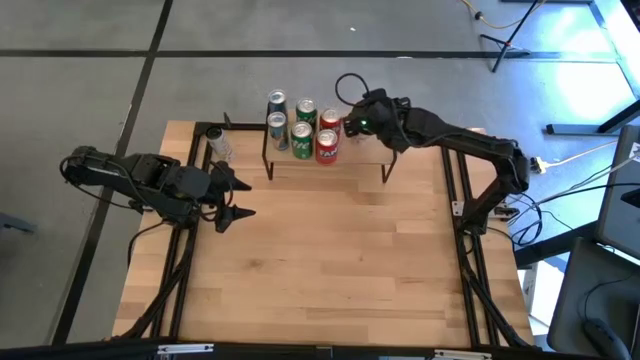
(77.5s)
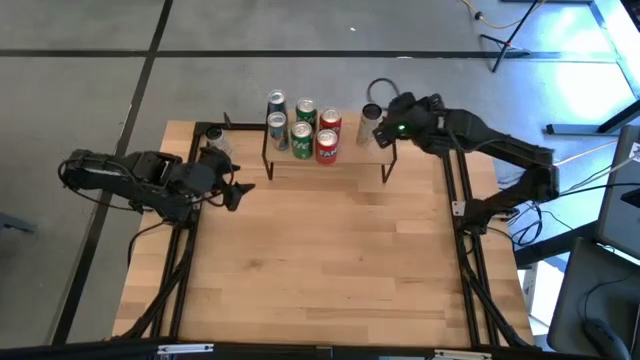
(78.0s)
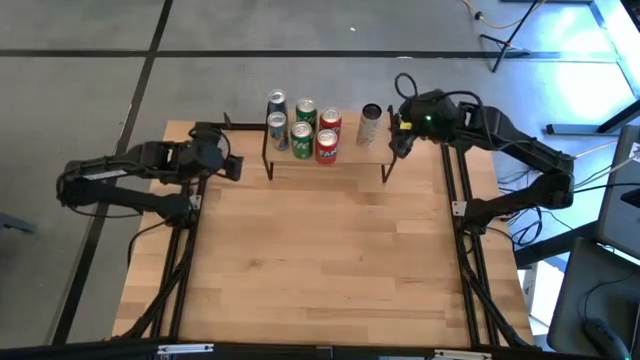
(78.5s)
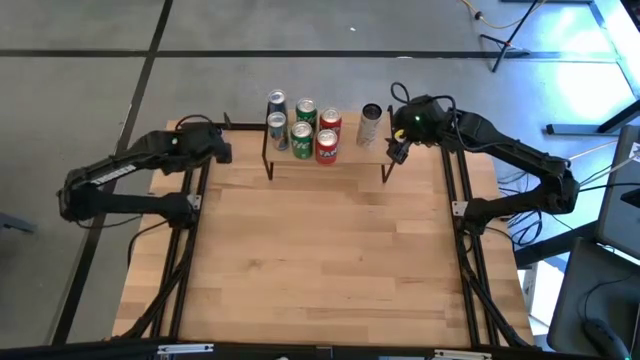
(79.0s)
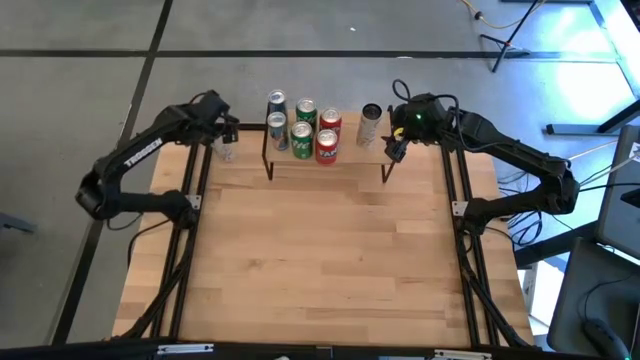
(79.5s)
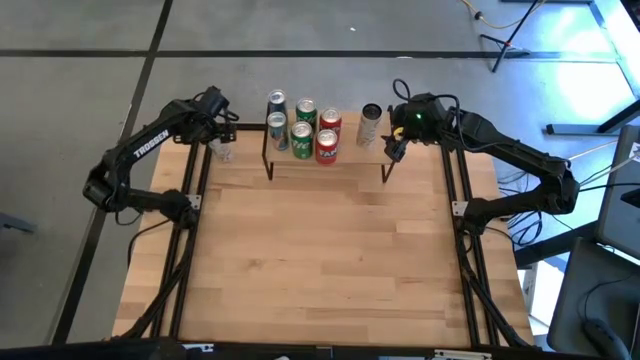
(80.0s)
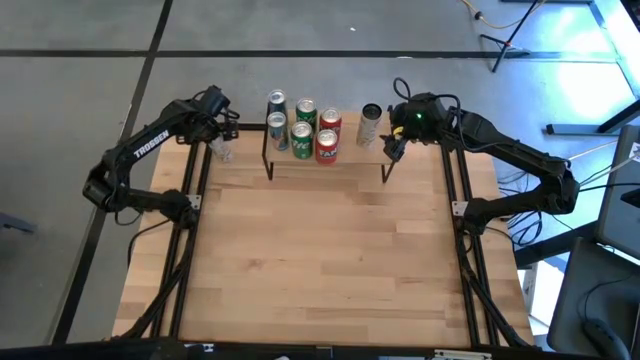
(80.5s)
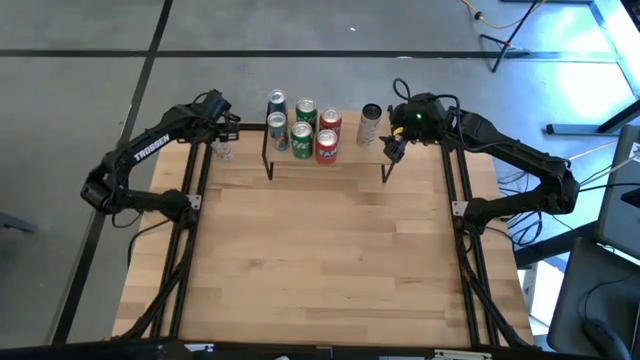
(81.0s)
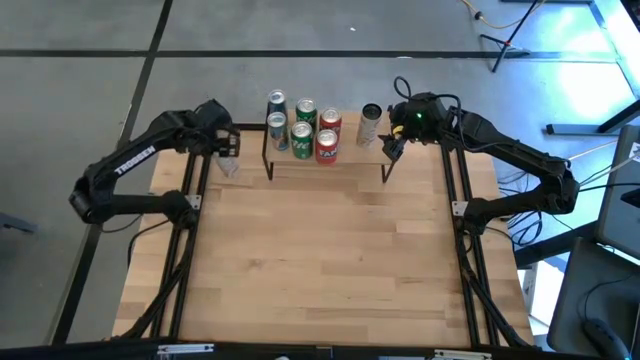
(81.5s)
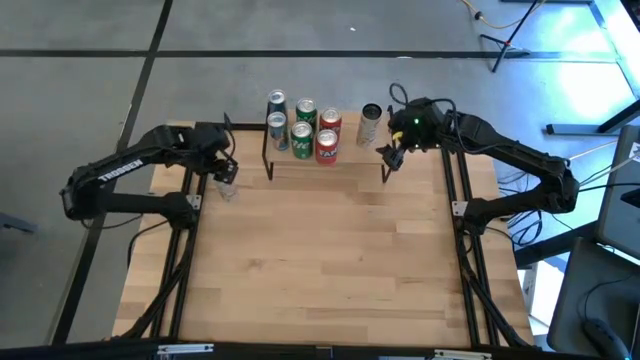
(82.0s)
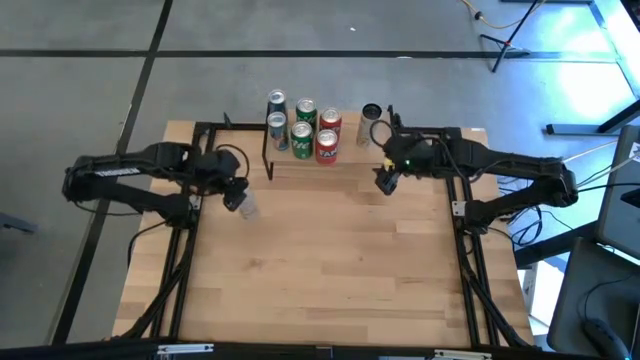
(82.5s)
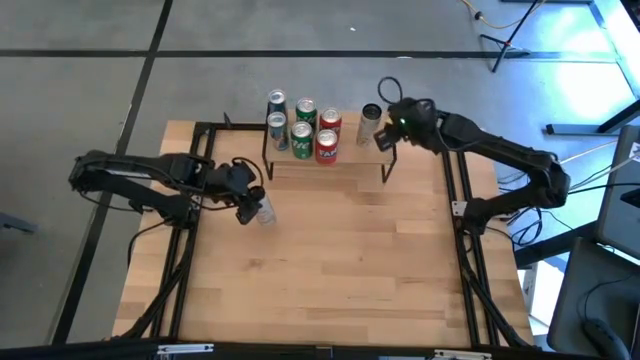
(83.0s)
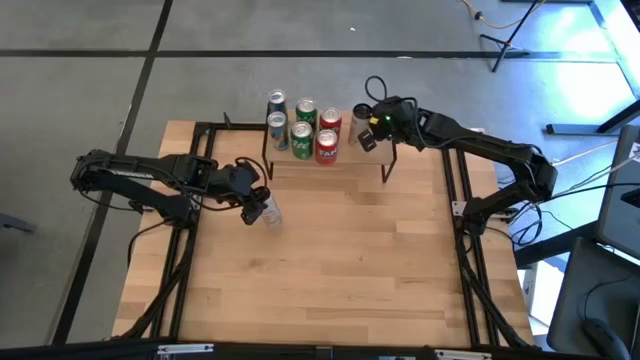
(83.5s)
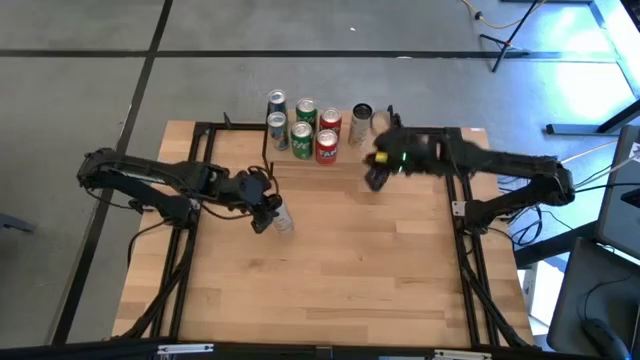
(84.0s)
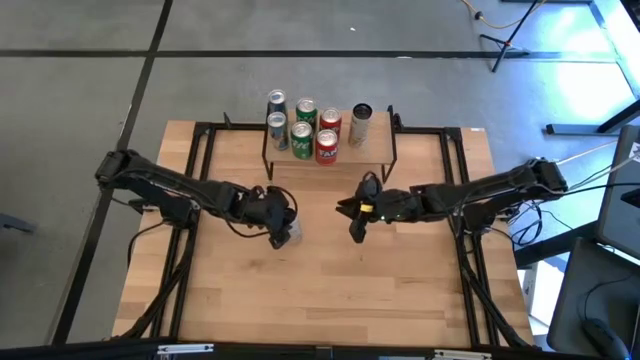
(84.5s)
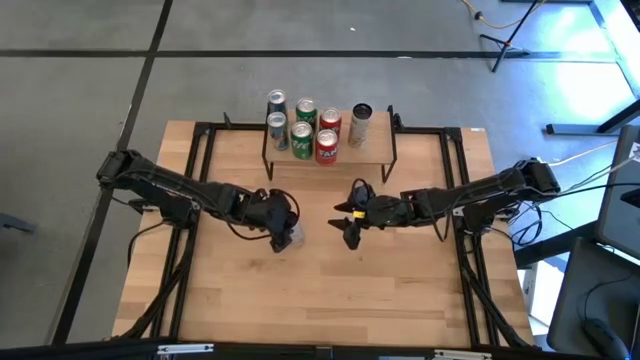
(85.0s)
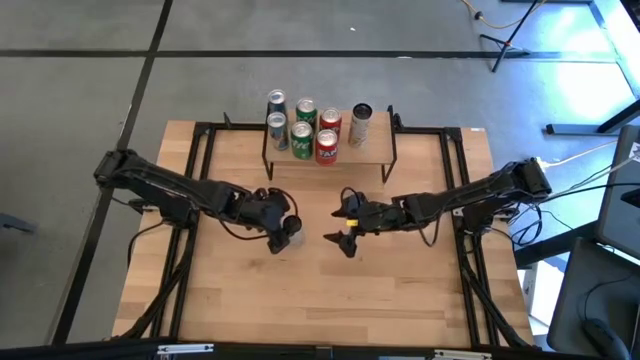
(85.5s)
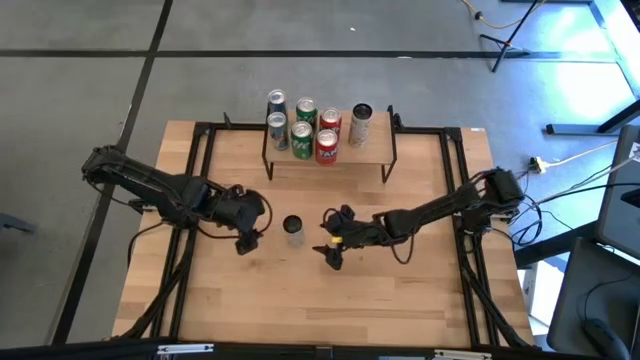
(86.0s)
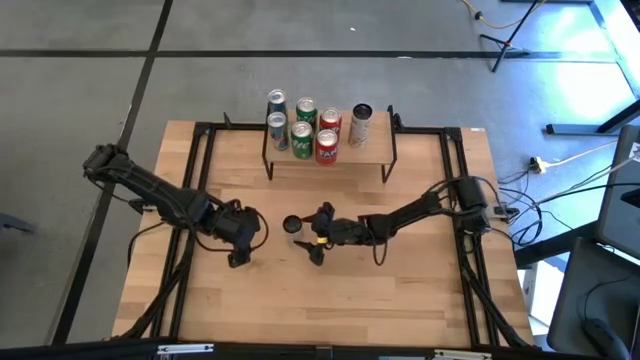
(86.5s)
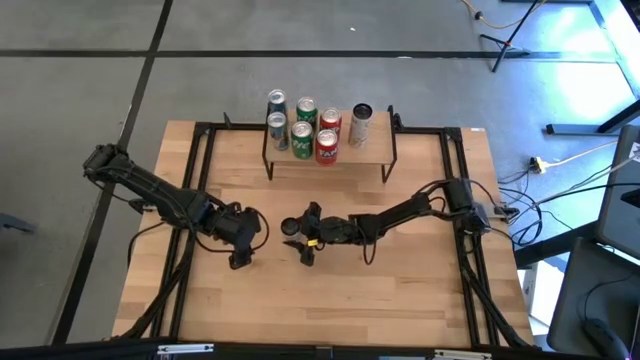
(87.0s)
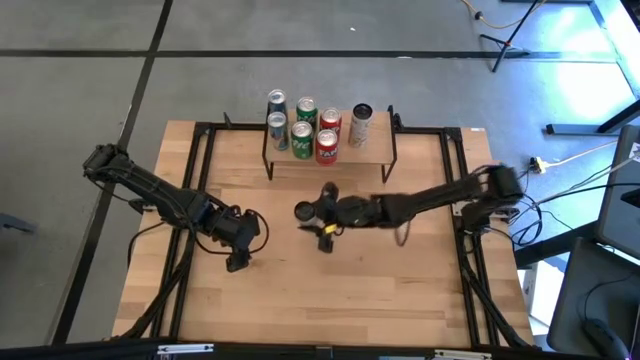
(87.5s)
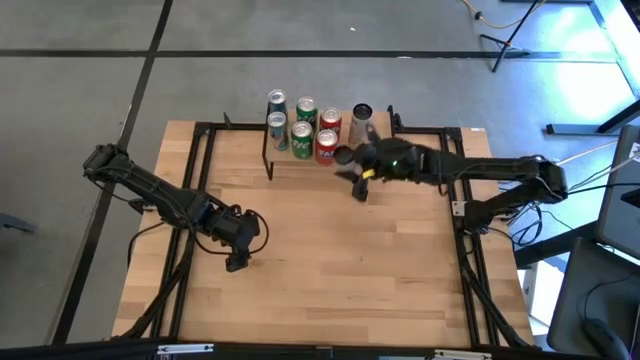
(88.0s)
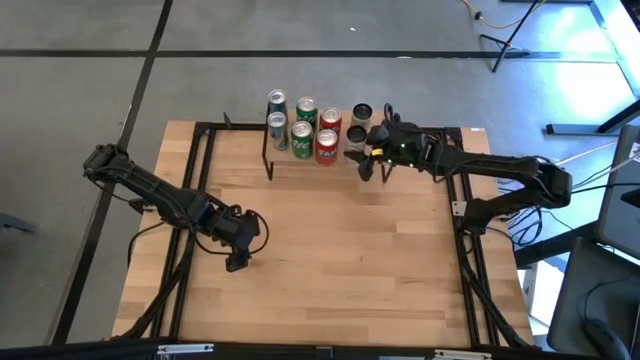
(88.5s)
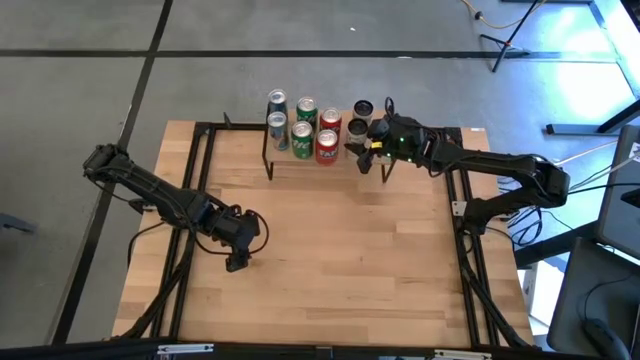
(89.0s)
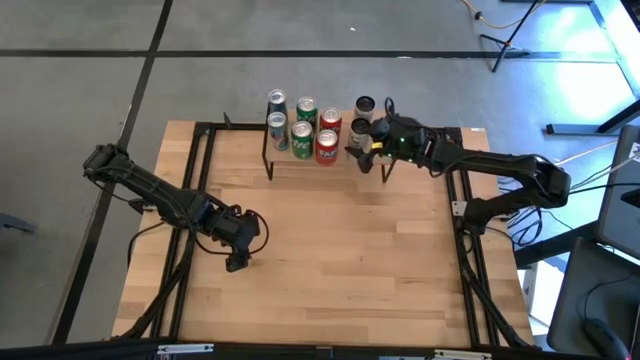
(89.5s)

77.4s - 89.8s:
Task: Place canned beverage on shelf
Put the white soda can on the shelf aligned with the other white soda can

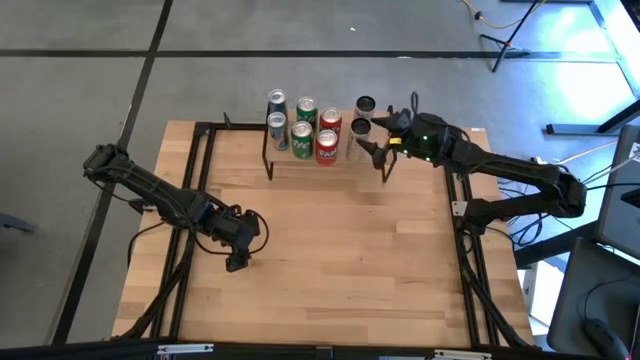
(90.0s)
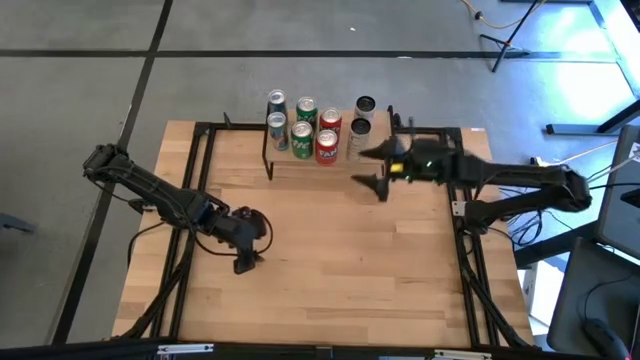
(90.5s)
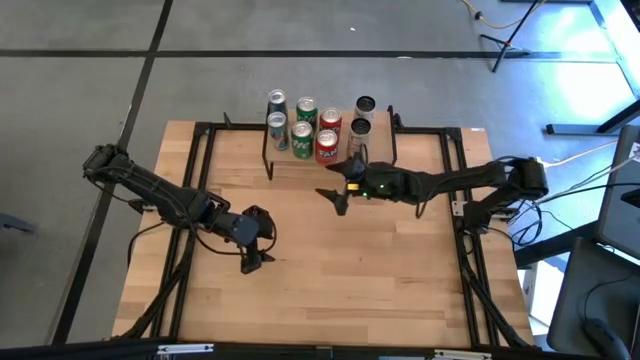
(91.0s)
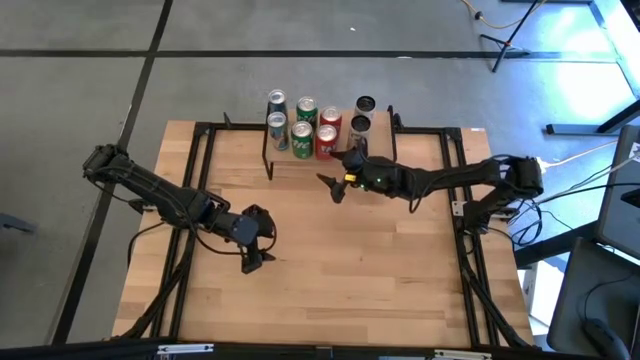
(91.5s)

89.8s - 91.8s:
Adjust the orange soda can on the shelf

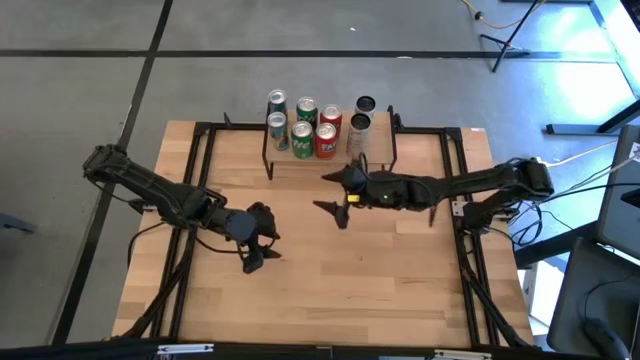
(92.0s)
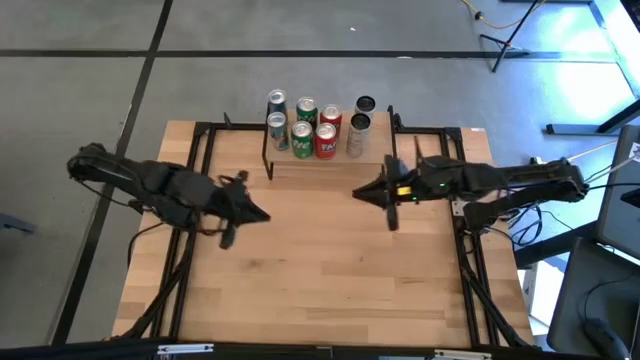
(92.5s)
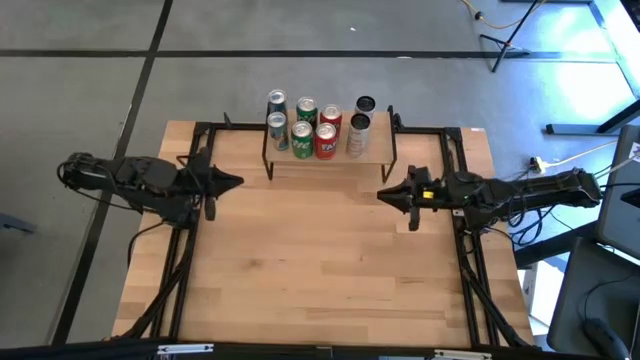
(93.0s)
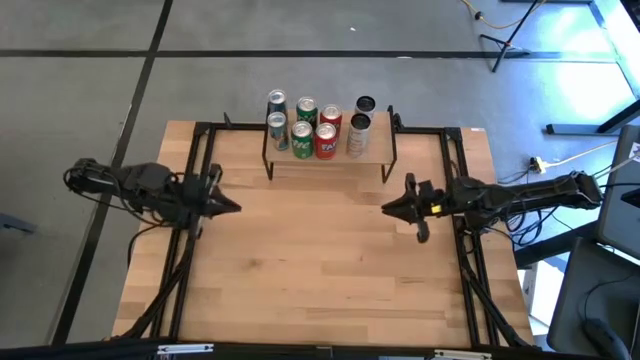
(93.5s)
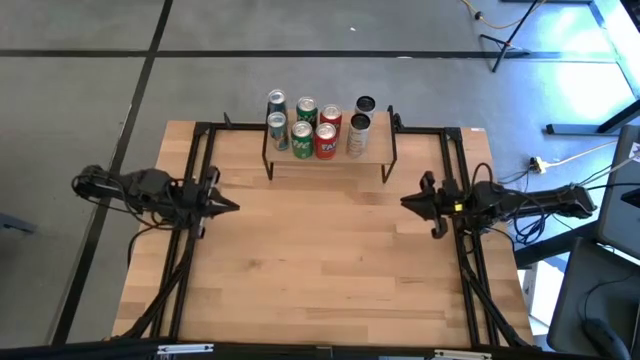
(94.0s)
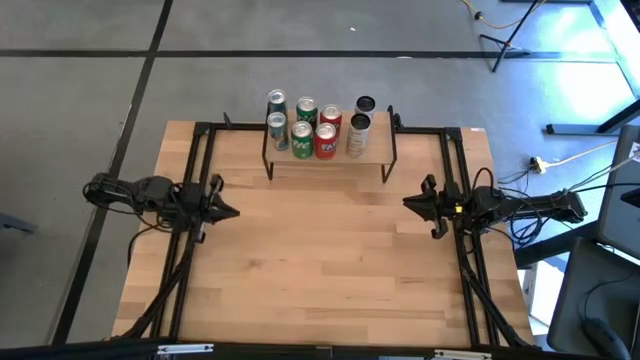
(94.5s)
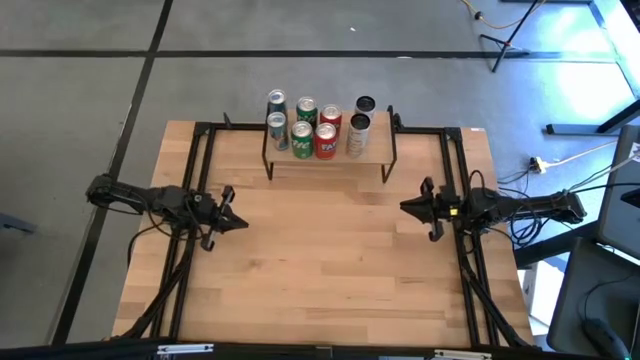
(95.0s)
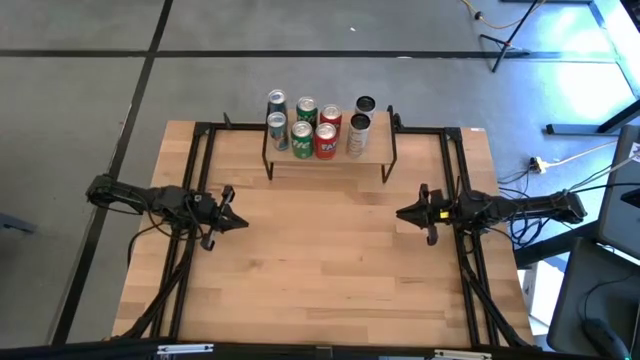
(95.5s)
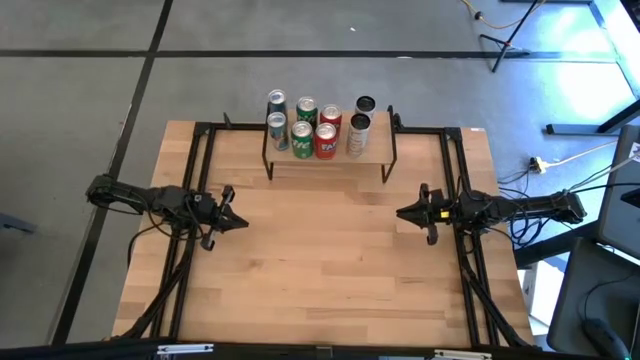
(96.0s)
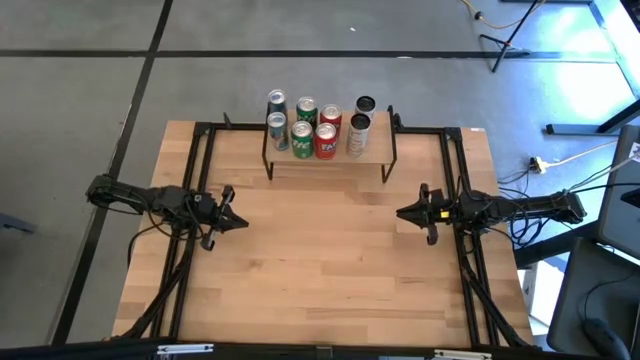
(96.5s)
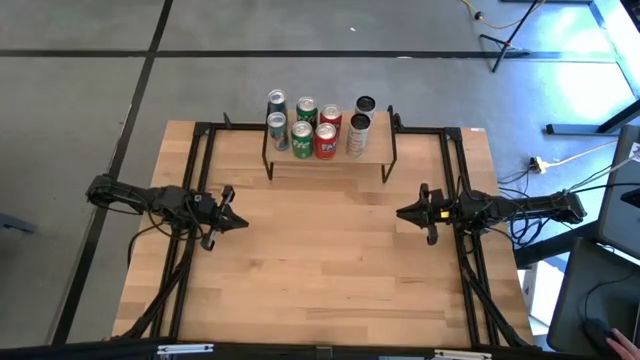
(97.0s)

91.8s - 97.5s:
Return to Home Position

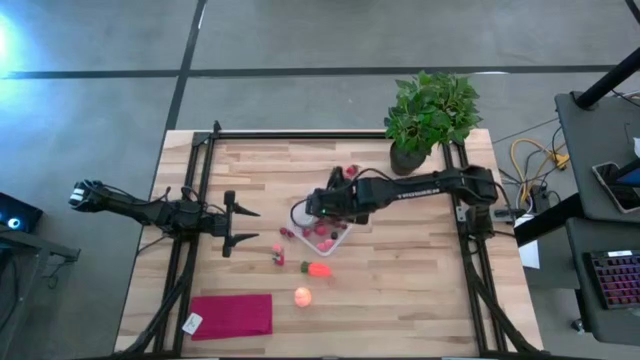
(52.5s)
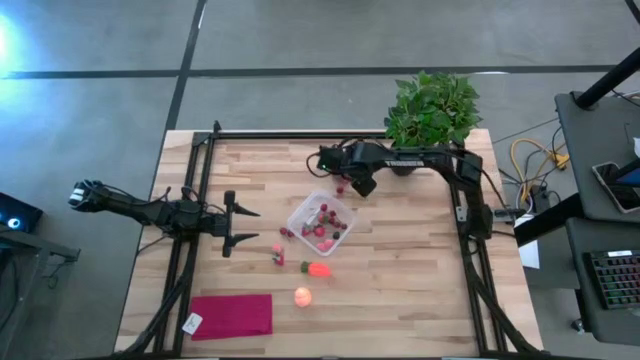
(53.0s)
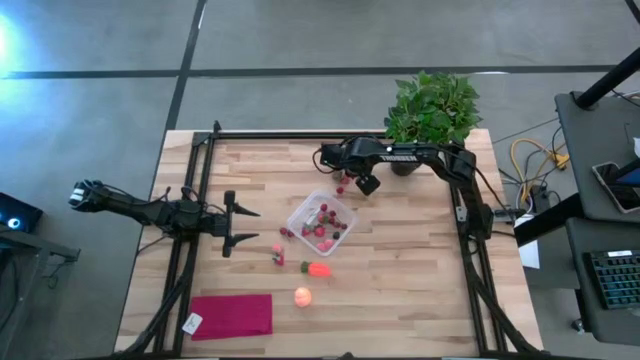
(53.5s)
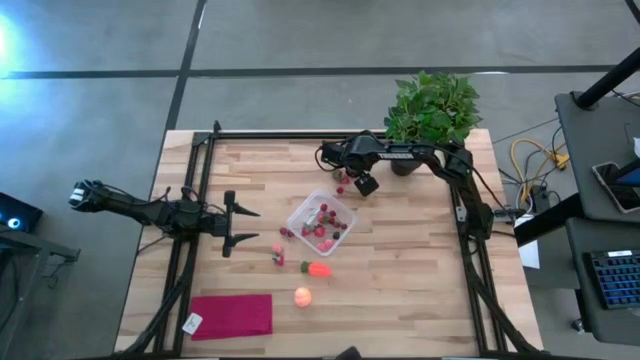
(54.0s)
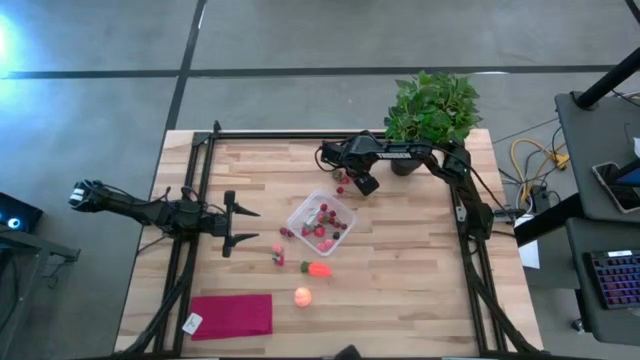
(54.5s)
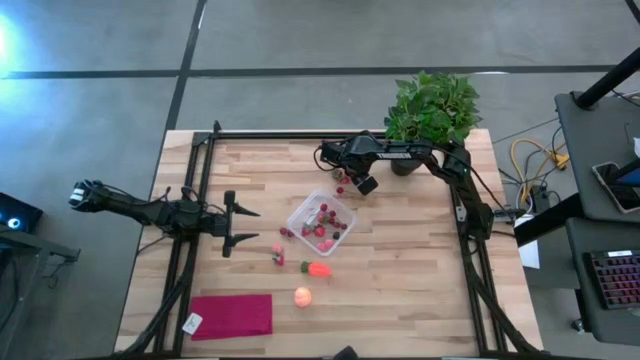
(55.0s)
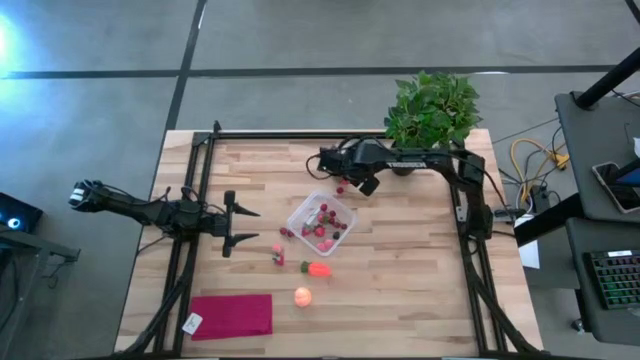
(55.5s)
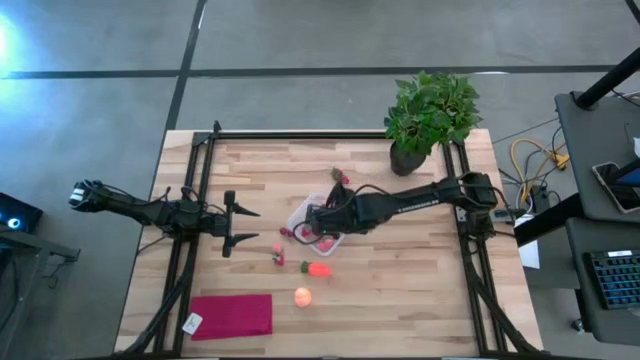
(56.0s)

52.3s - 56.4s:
Task: Pick and placing Produce into tupperware
Put the strawberry into the transparent container
